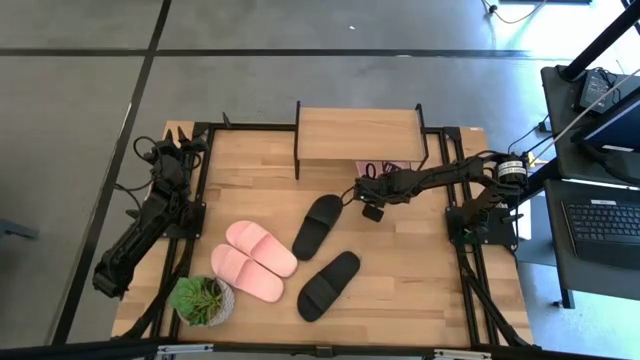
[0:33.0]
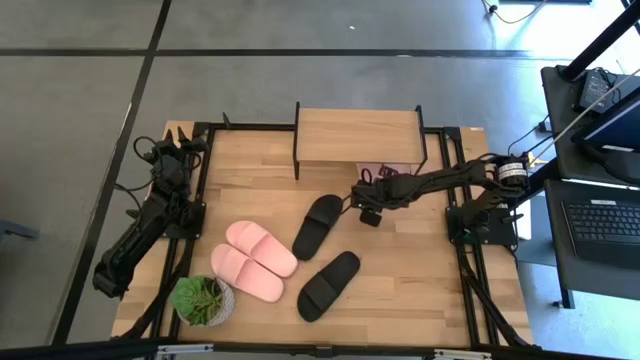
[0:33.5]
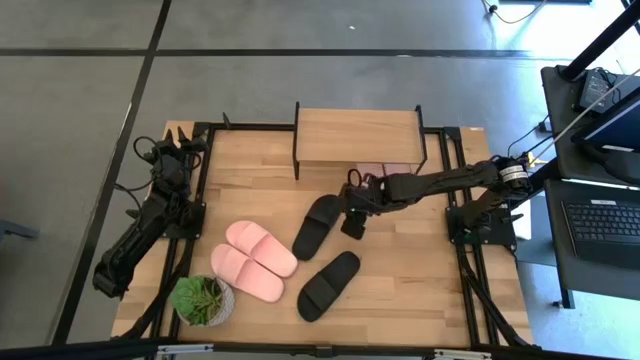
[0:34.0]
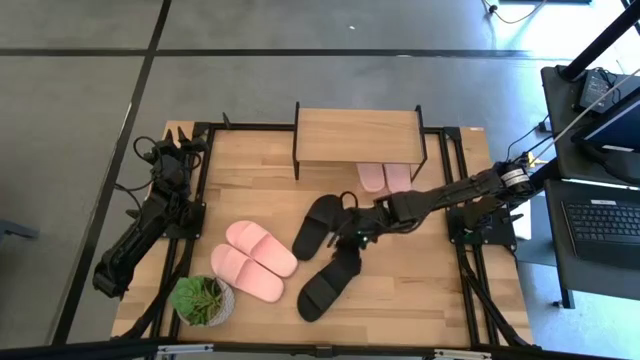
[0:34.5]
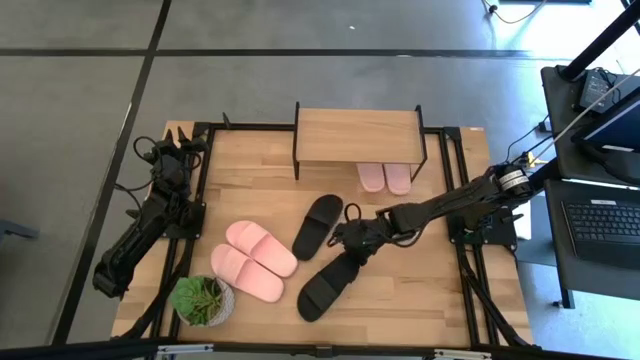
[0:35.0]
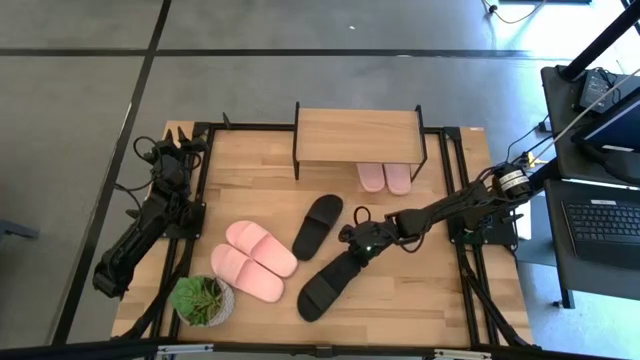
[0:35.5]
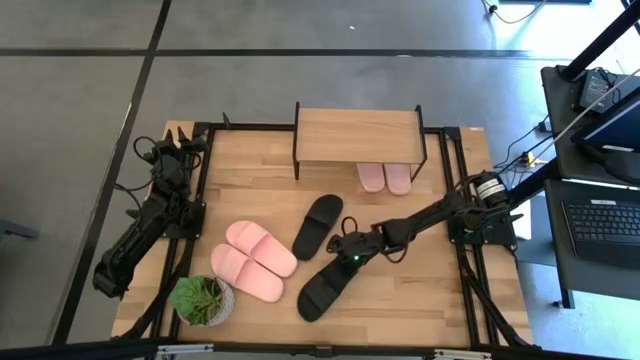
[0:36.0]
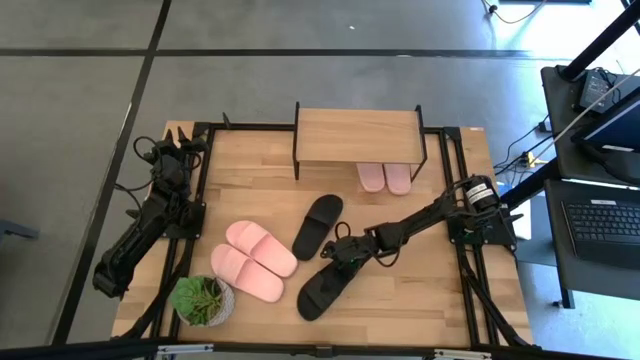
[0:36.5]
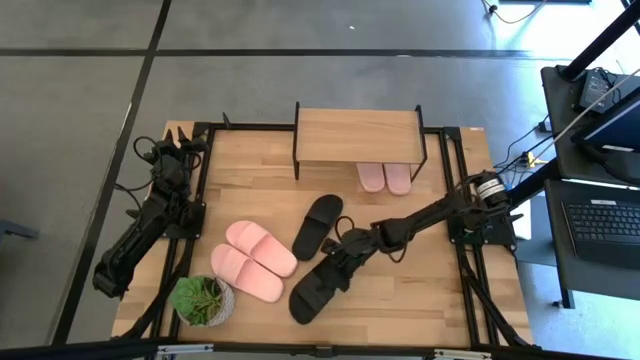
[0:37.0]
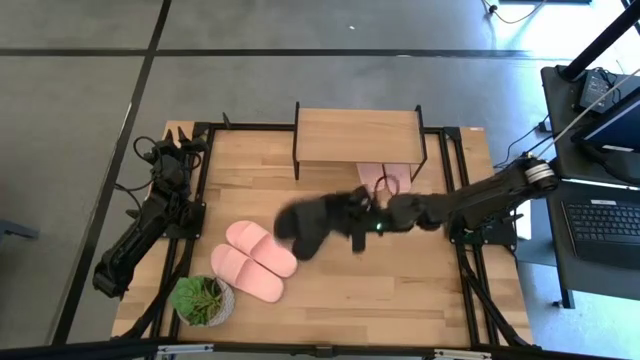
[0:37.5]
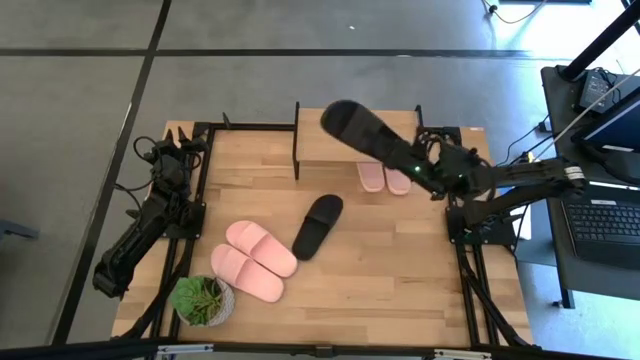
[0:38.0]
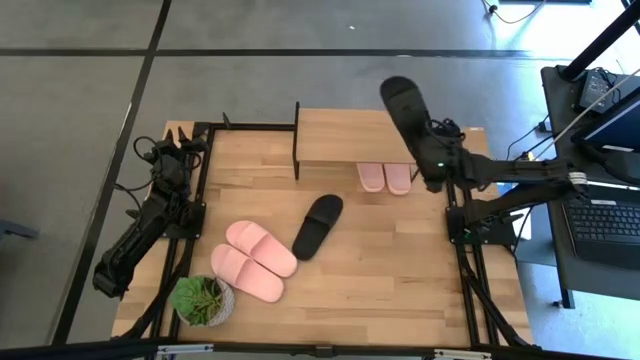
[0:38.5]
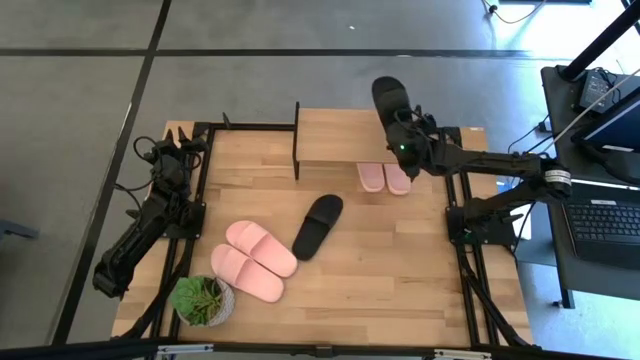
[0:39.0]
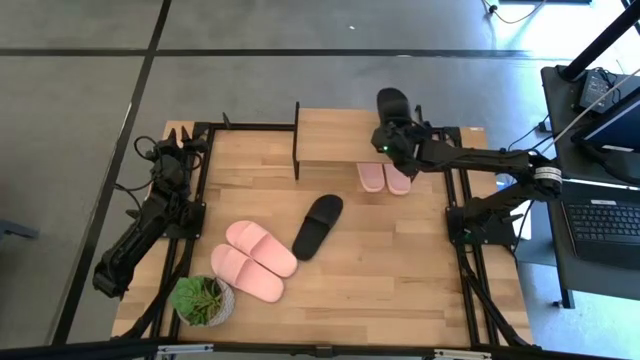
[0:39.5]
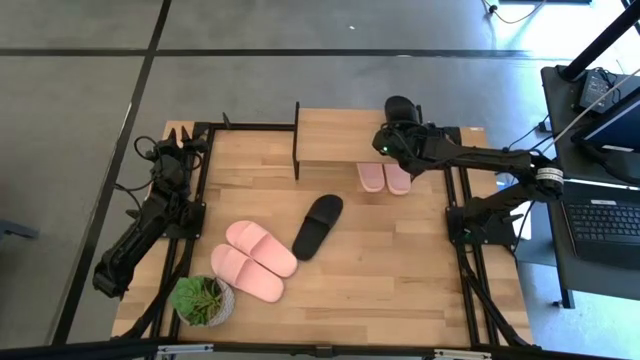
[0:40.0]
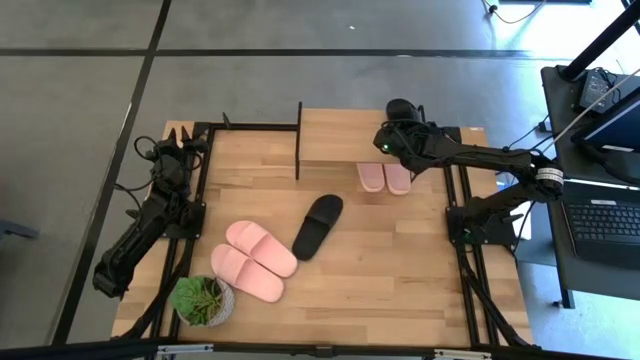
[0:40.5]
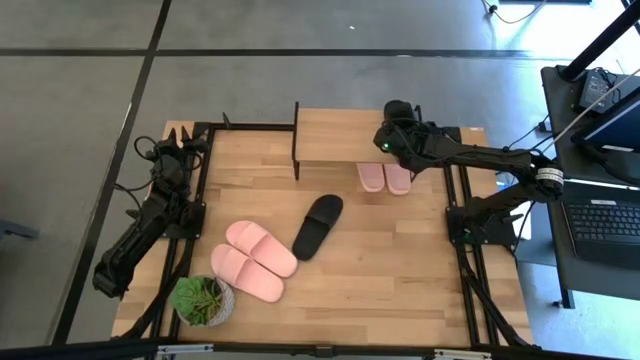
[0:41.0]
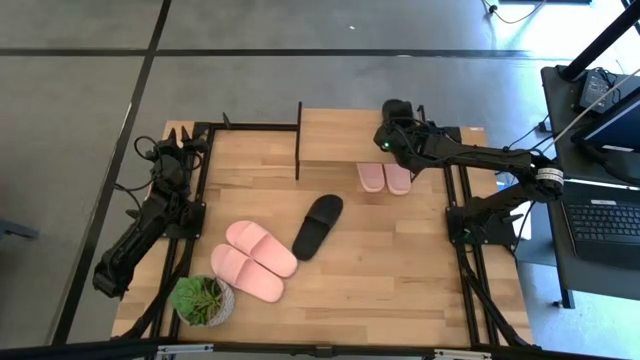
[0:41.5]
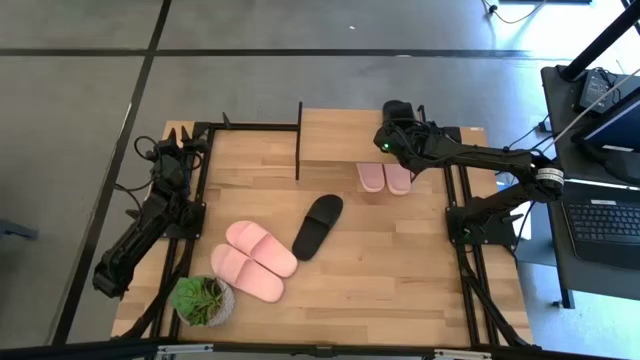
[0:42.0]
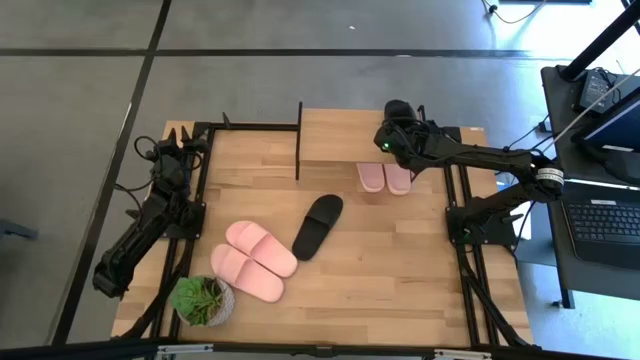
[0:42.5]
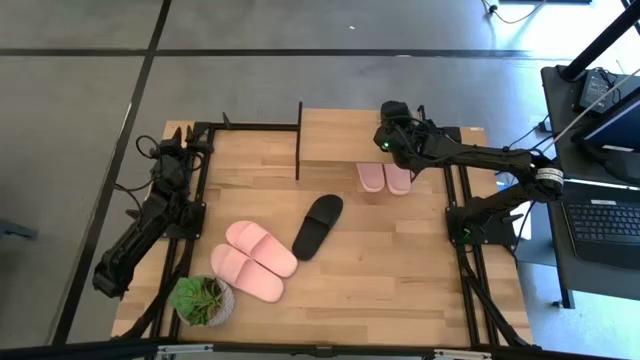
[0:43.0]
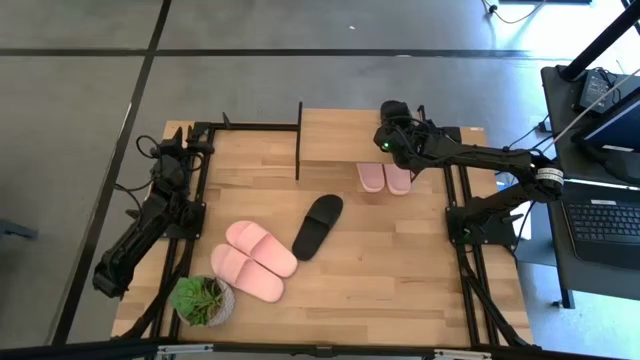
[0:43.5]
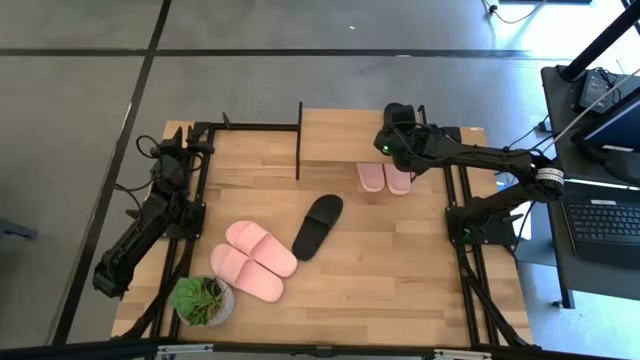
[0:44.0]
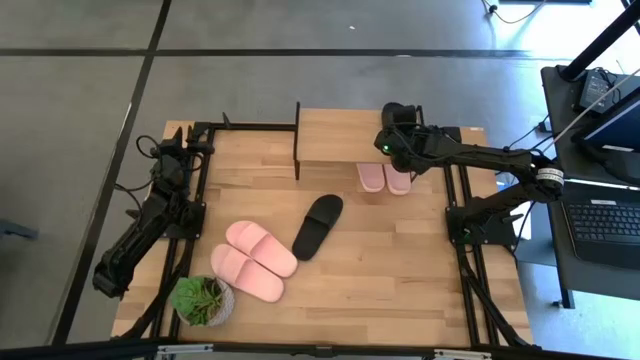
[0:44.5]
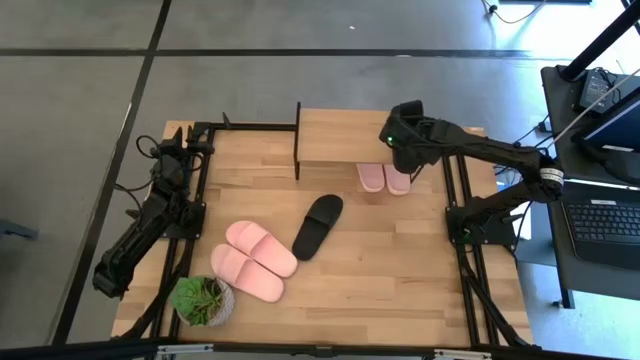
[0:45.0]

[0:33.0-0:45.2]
Task: Pick and place slides into the shelf
Put the black slipper on the shelf

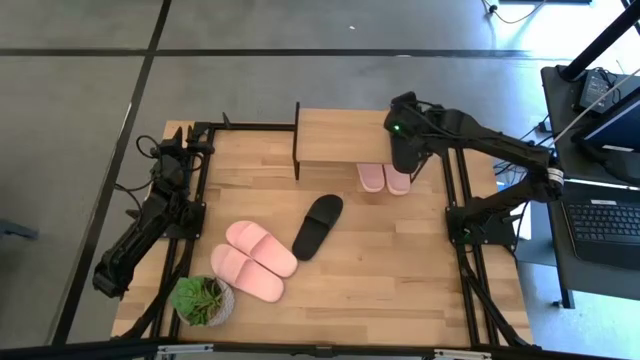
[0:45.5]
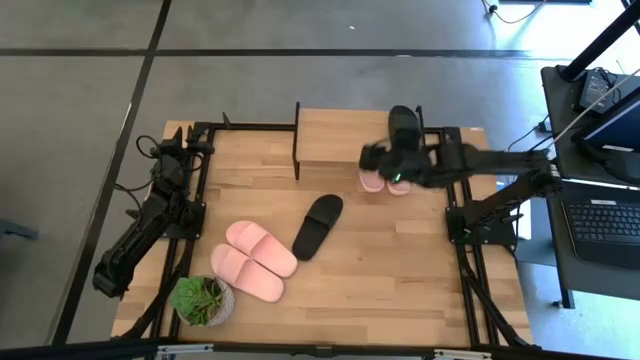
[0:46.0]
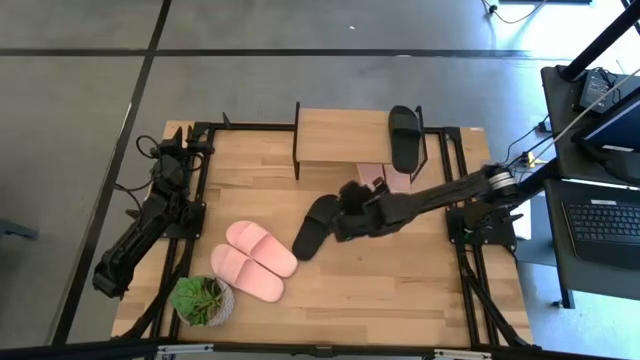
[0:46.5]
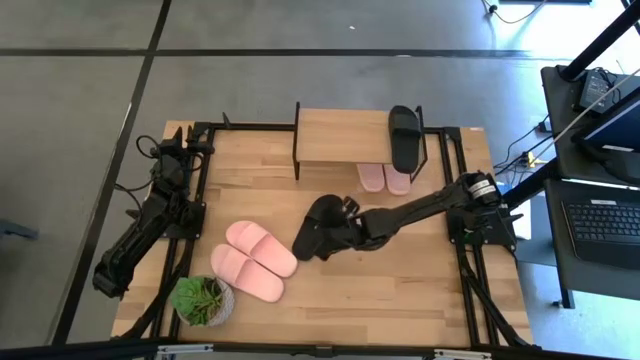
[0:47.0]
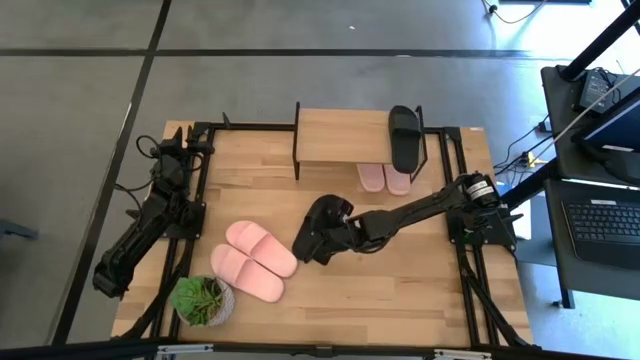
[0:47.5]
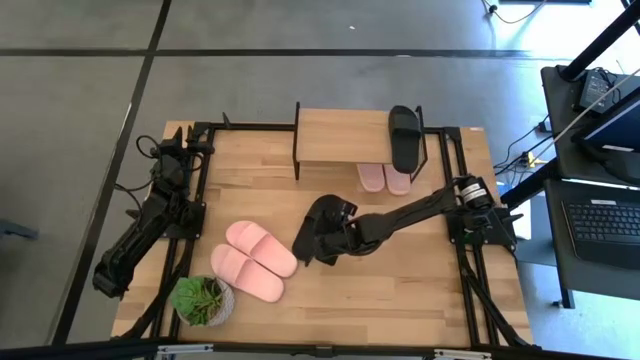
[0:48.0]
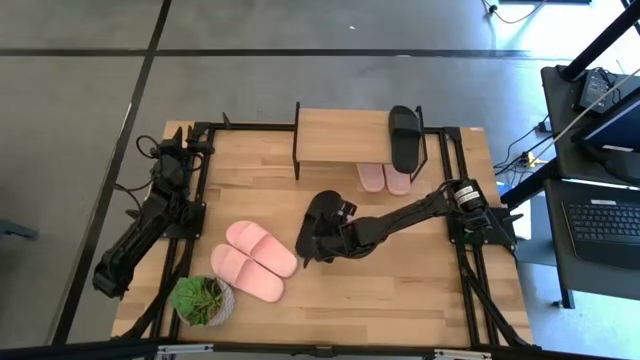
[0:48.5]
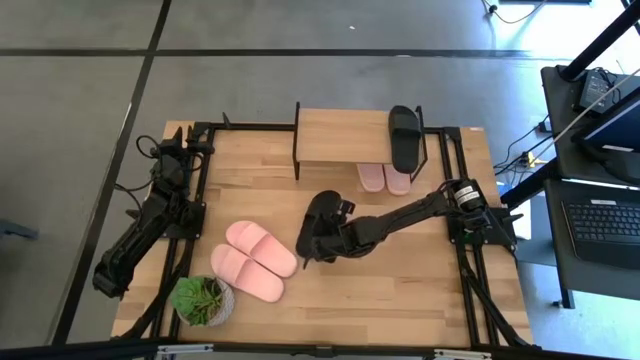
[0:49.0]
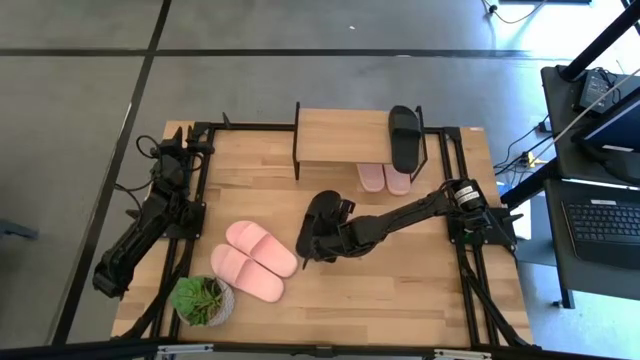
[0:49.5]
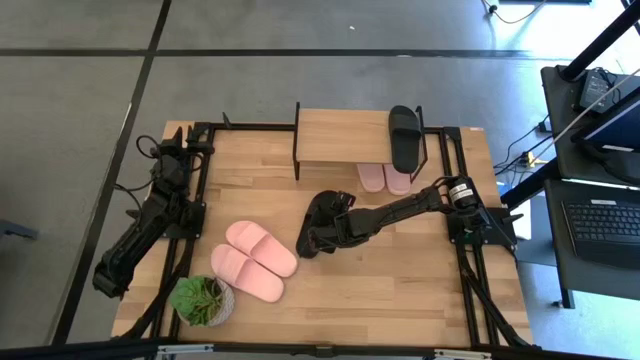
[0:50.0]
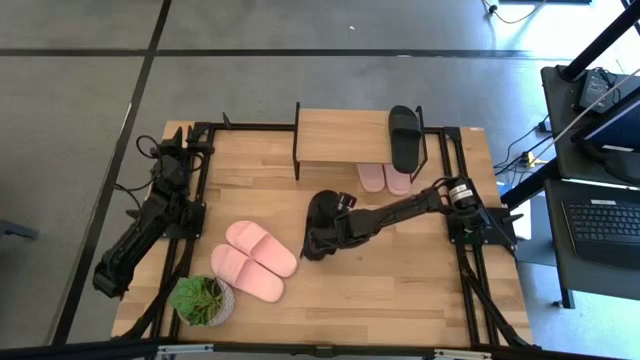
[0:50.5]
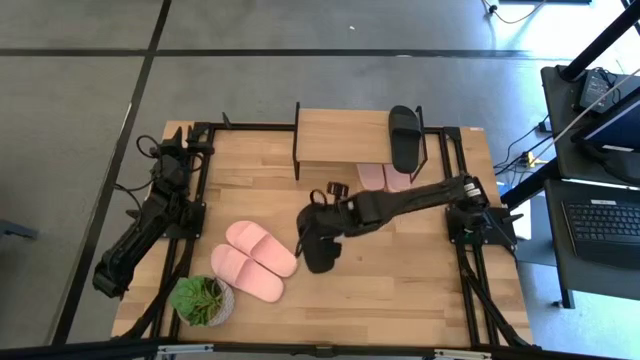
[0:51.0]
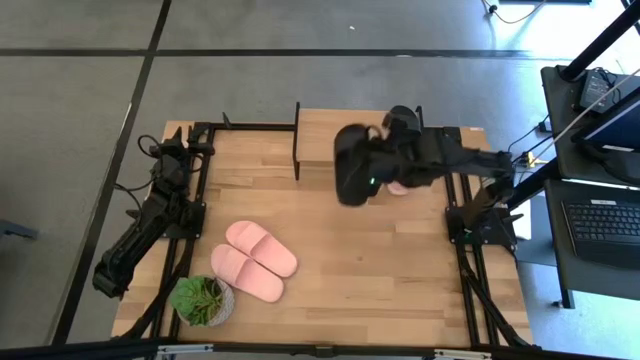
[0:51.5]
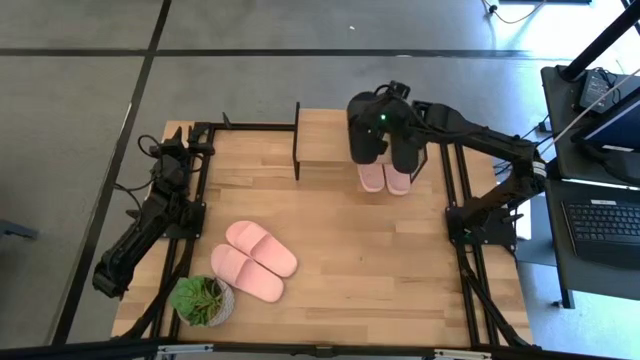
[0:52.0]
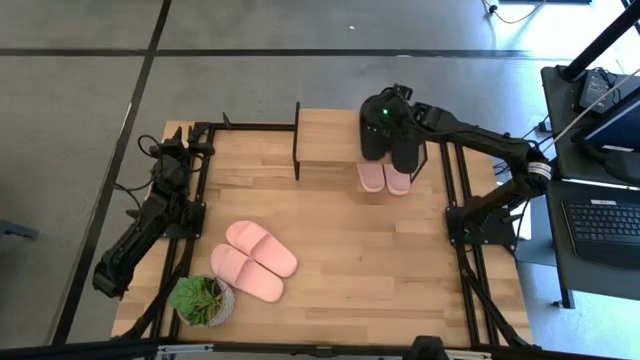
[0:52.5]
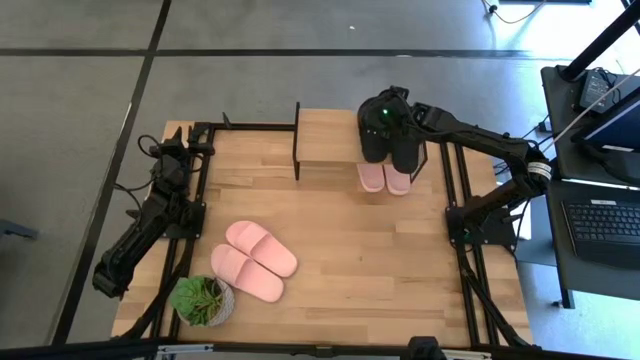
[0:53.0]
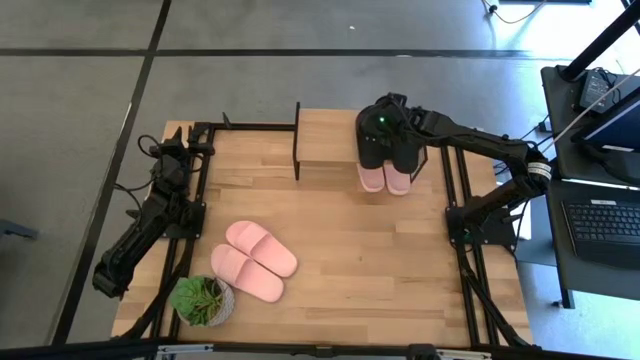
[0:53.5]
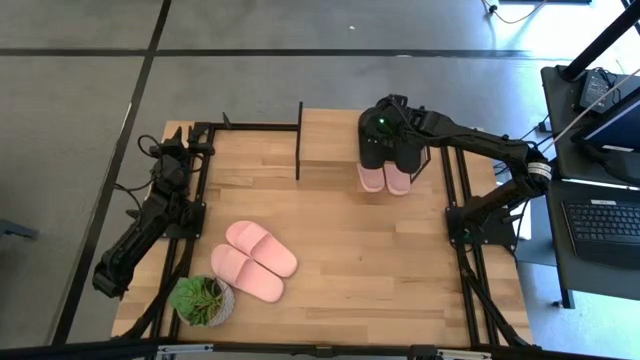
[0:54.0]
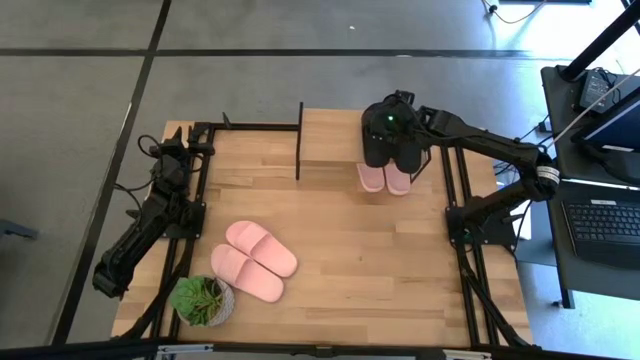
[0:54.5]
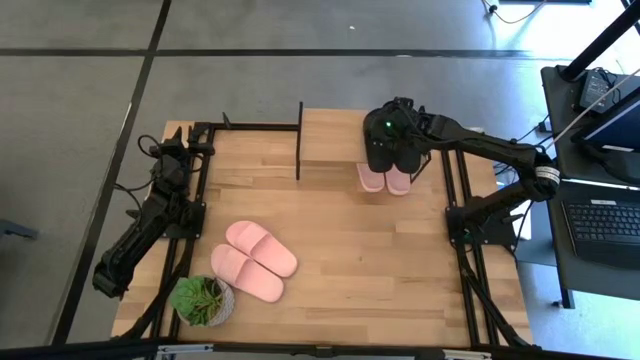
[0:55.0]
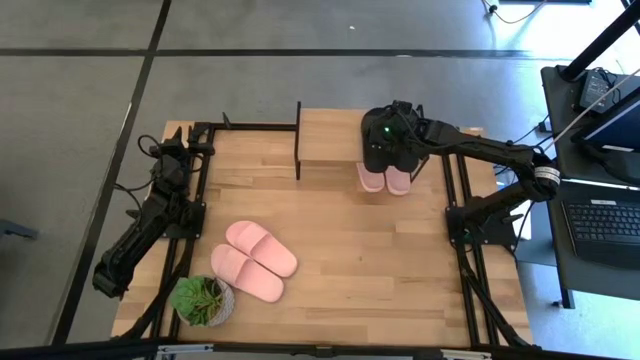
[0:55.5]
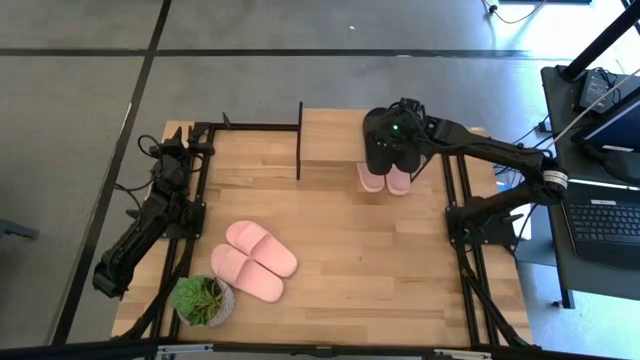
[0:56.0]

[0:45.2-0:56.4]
Put the black slipper on the shelf
